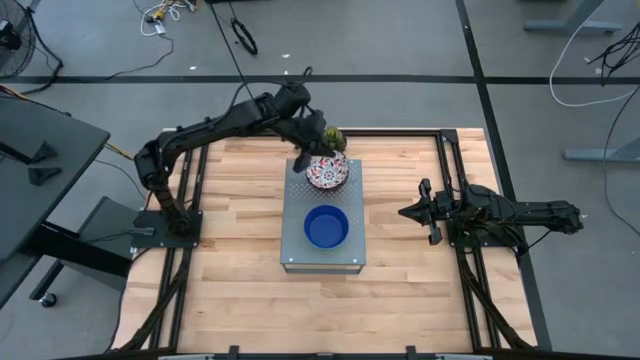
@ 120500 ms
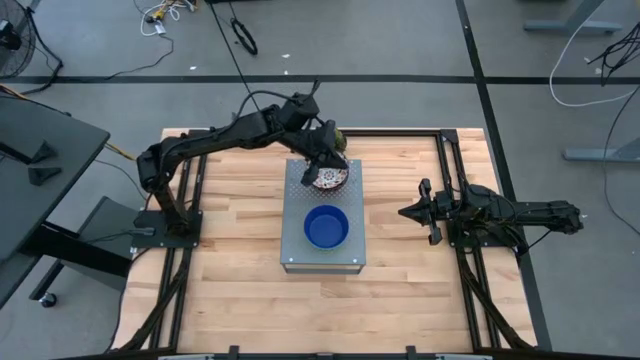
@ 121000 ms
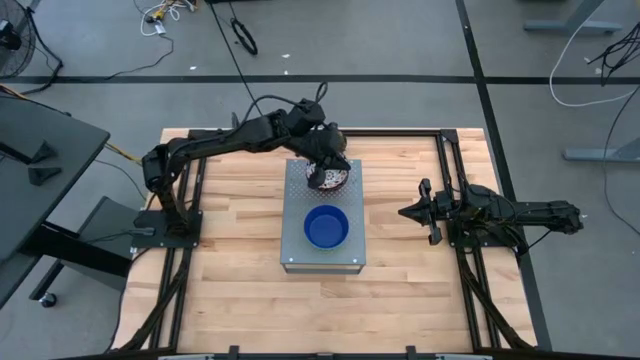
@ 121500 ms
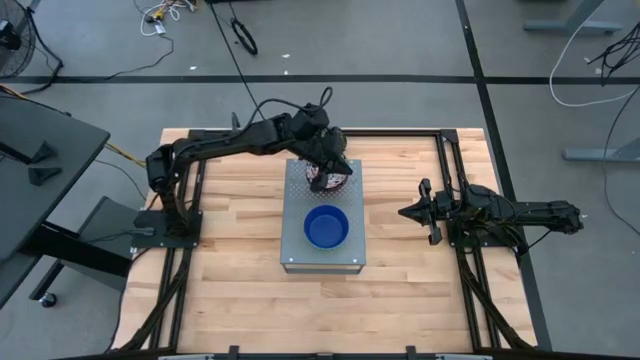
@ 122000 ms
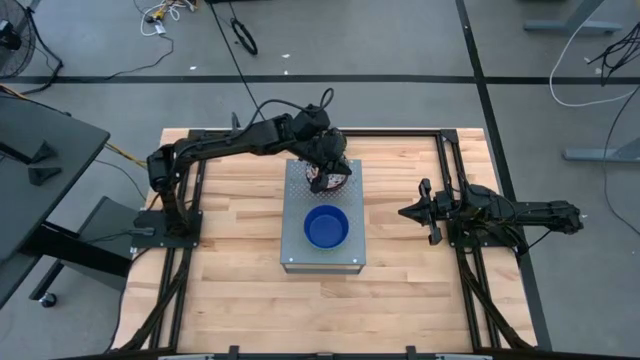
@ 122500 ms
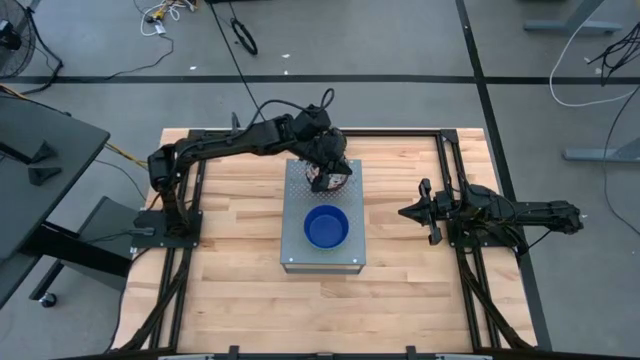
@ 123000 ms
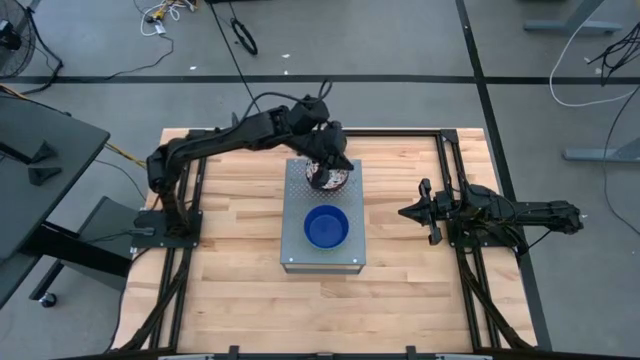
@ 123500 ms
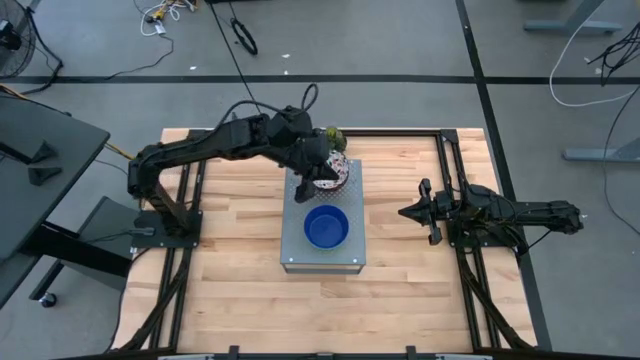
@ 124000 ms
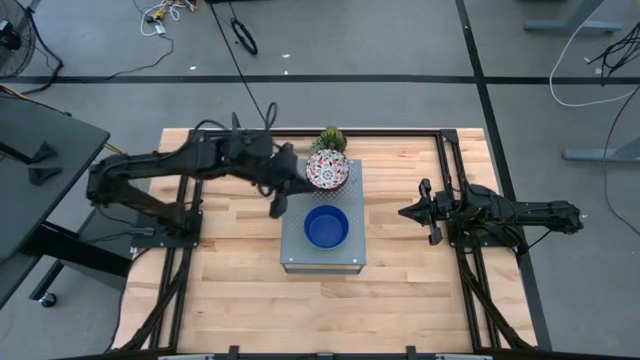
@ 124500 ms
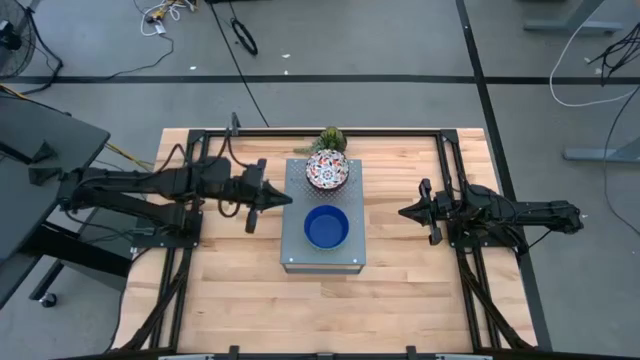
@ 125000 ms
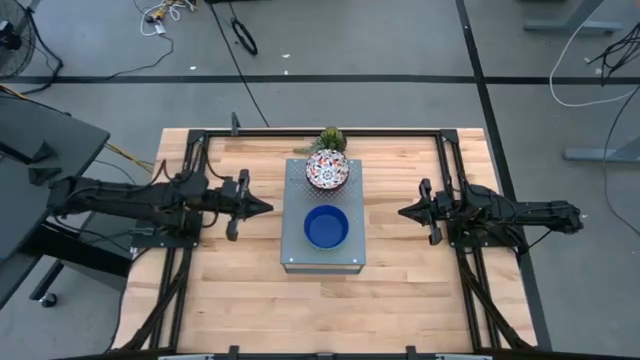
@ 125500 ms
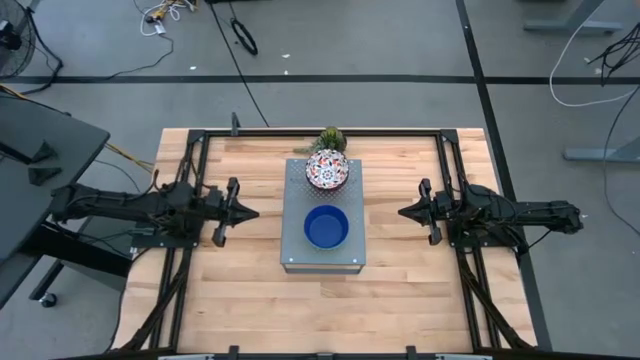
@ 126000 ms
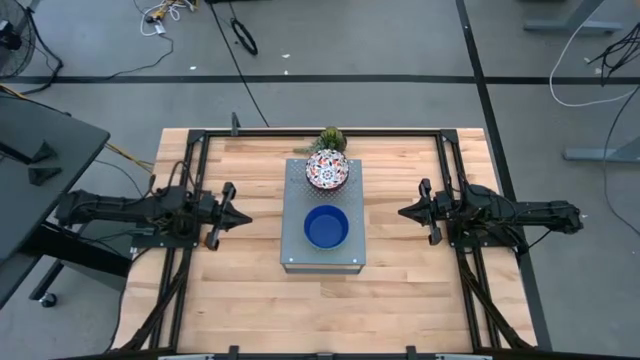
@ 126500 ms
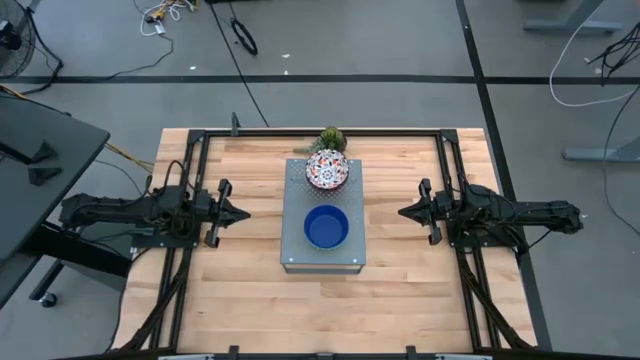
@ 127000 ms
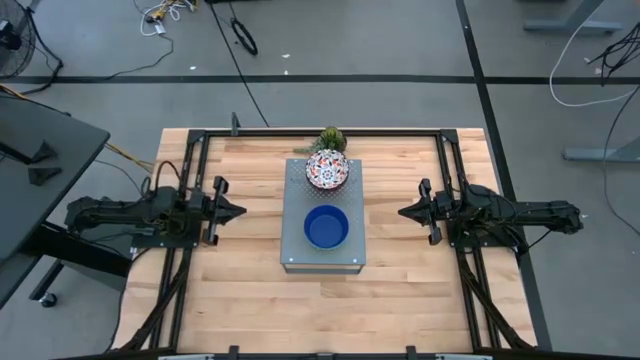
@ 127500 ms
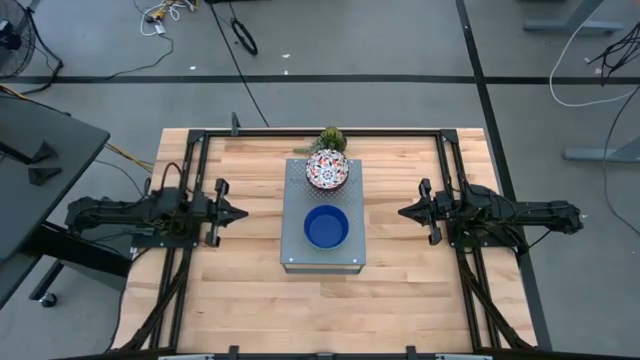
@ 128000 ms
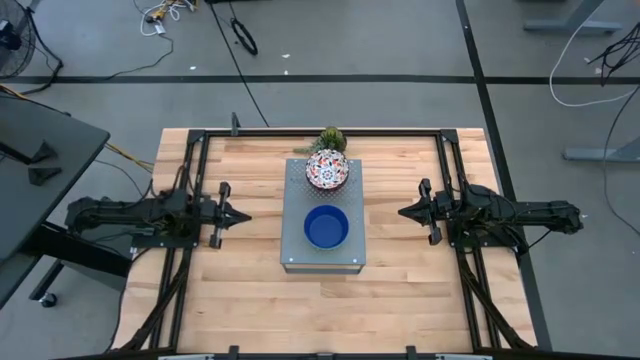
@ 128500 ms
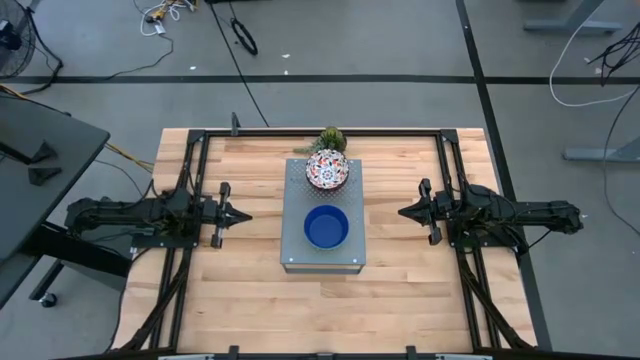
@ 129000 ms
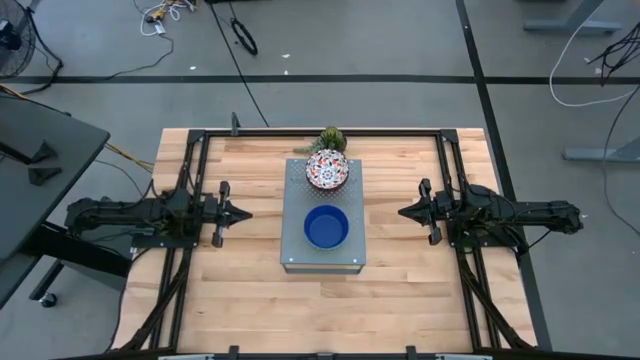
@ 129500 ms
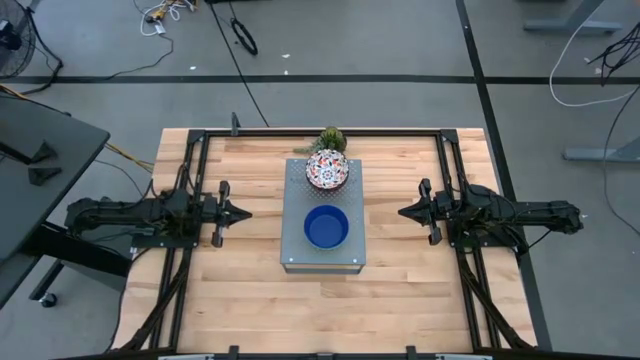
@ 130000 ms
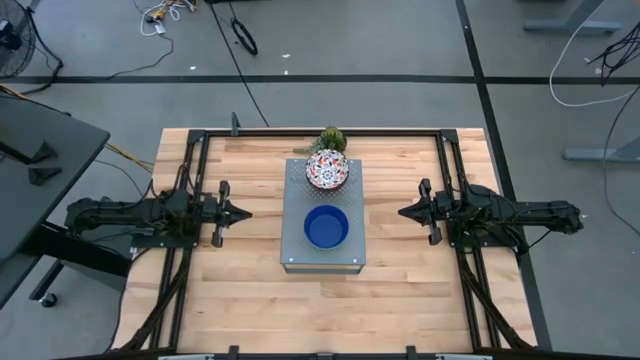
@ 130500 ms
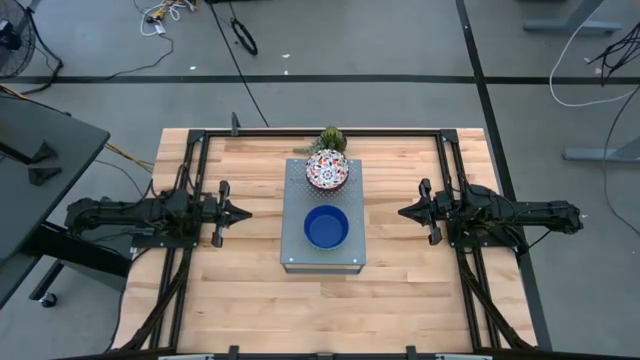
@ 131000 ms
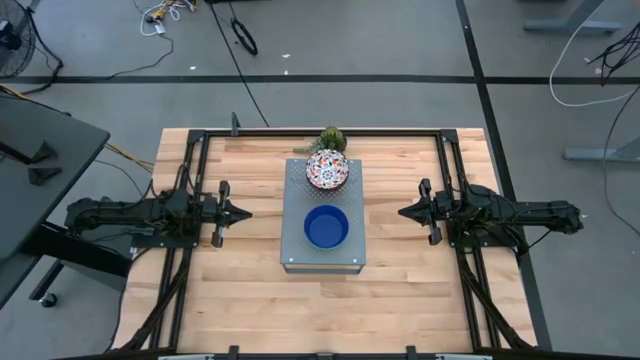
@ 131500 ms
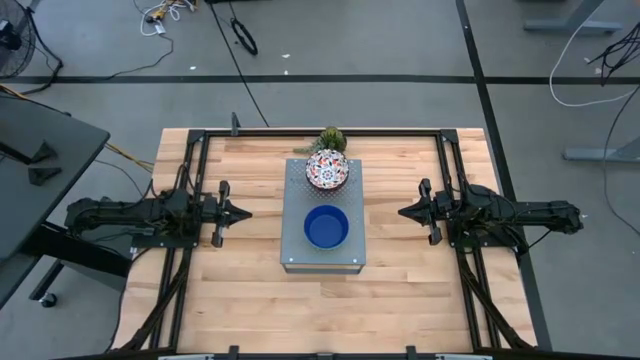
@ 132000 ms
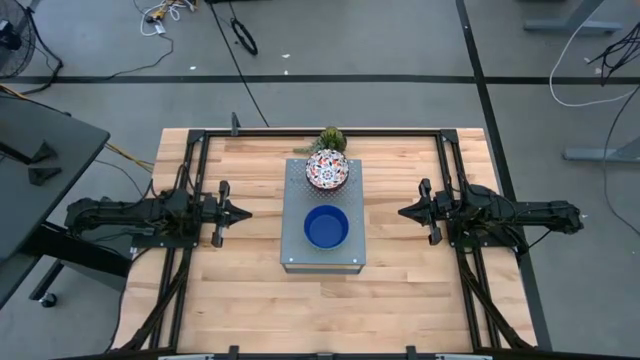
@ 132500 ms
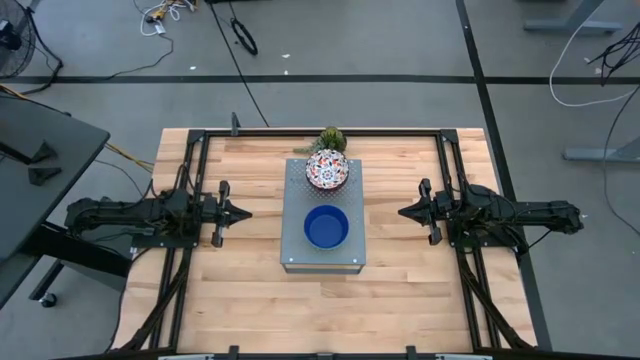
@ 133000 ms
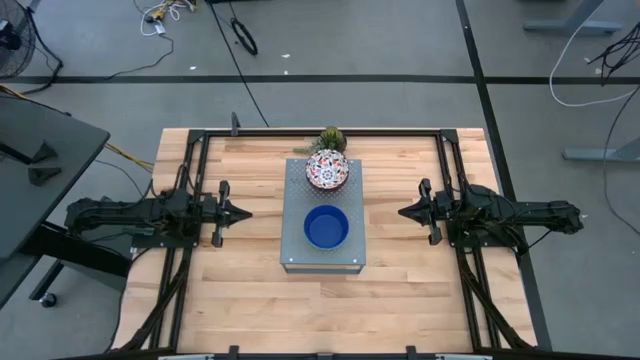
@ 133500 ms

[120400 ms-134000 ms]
Task: Pick & Place Mini bowls
Return to Home Position

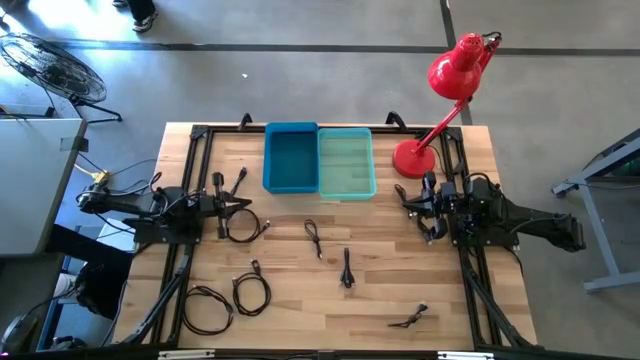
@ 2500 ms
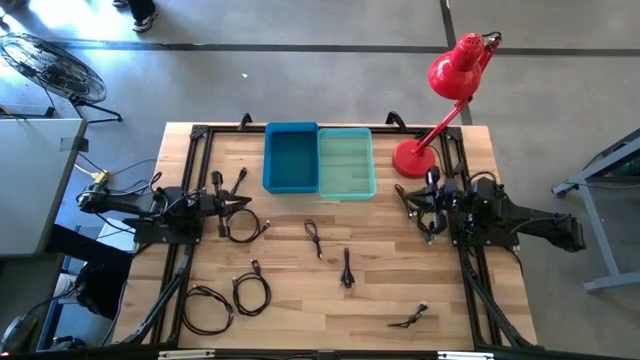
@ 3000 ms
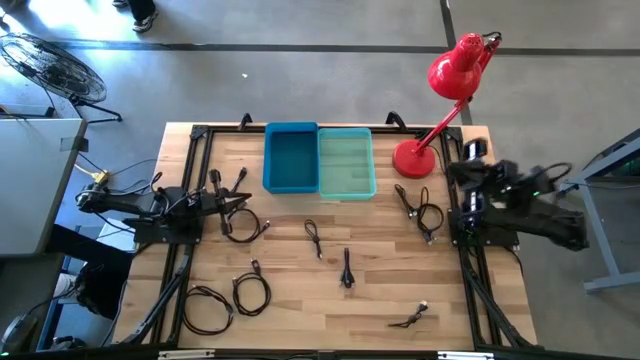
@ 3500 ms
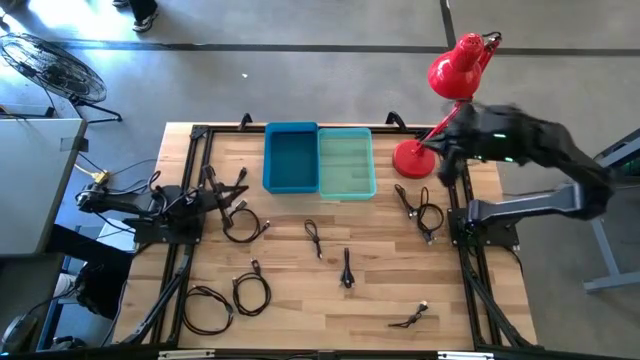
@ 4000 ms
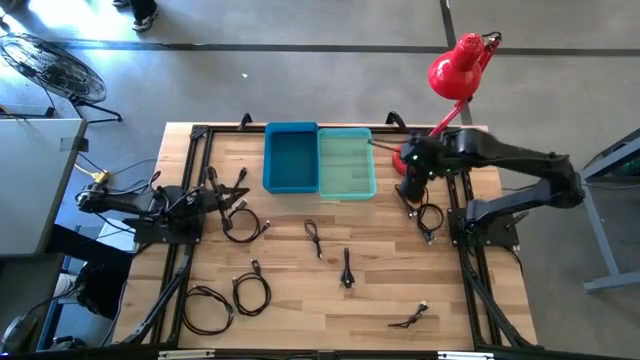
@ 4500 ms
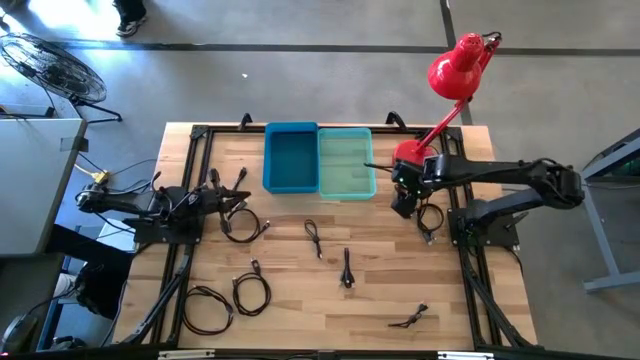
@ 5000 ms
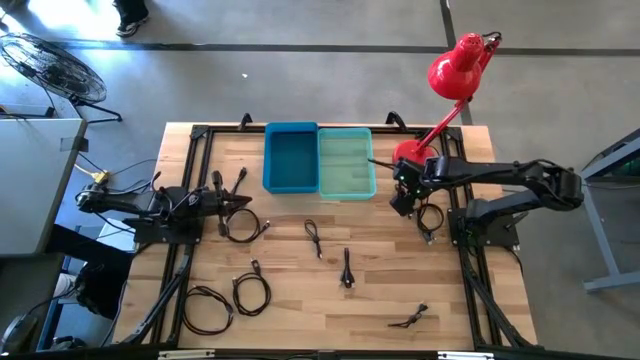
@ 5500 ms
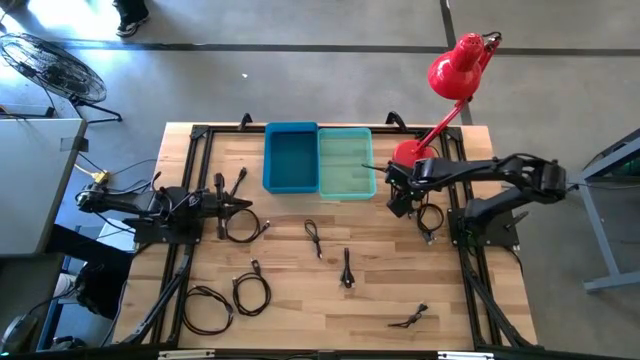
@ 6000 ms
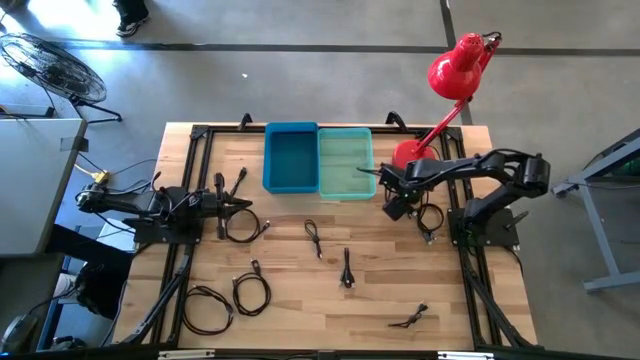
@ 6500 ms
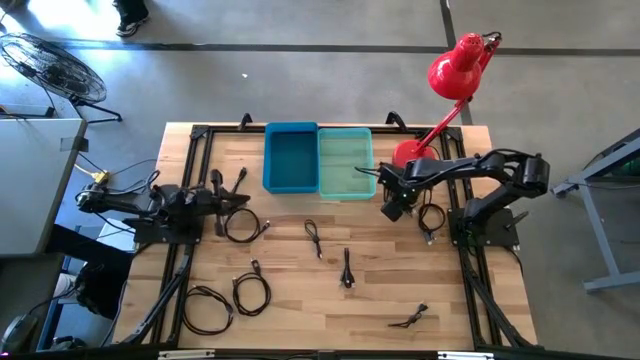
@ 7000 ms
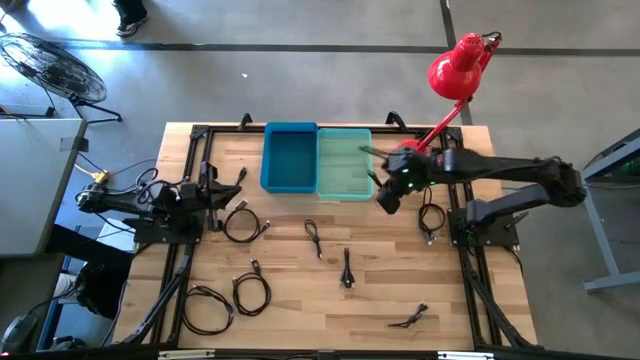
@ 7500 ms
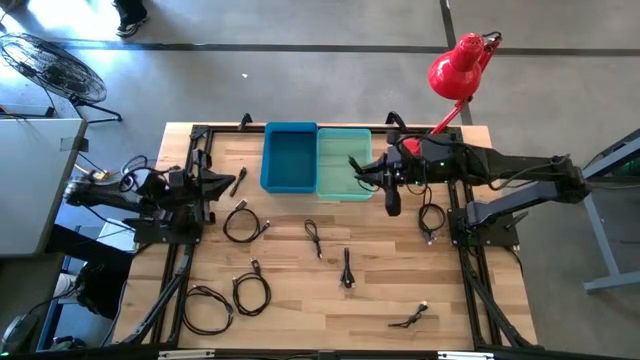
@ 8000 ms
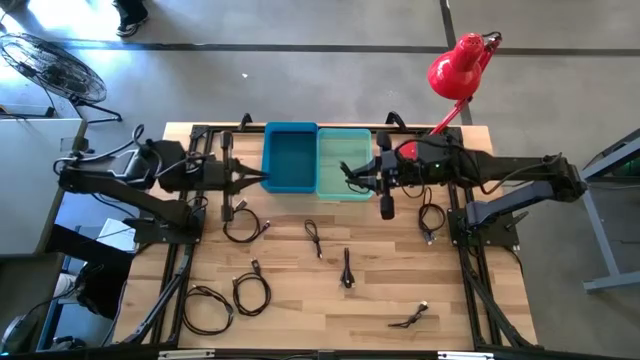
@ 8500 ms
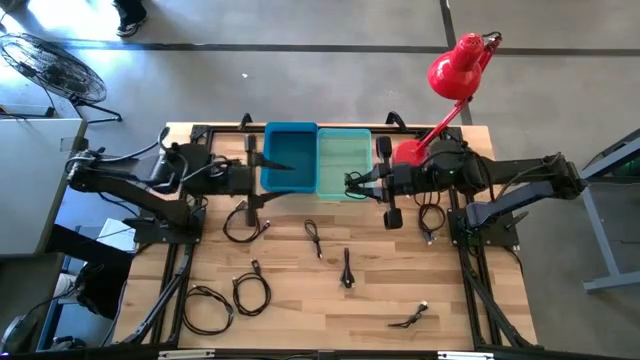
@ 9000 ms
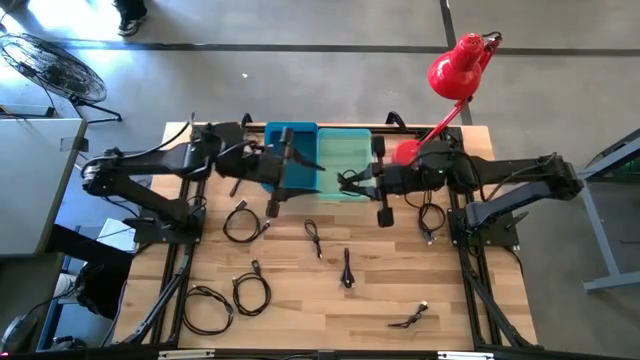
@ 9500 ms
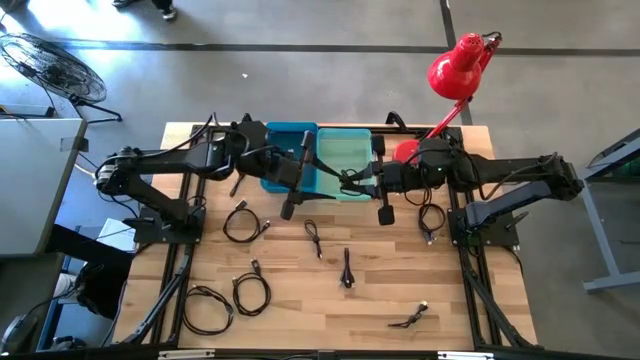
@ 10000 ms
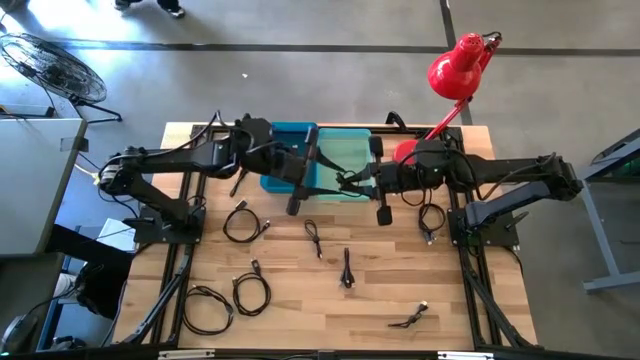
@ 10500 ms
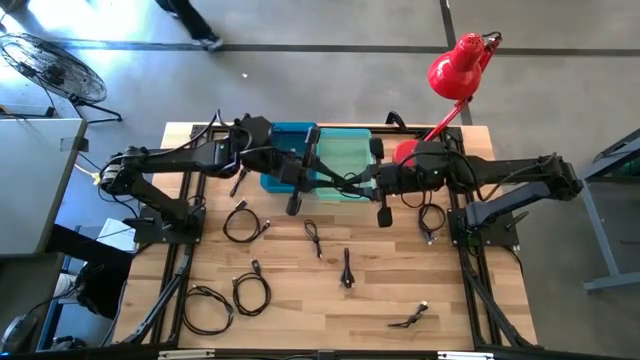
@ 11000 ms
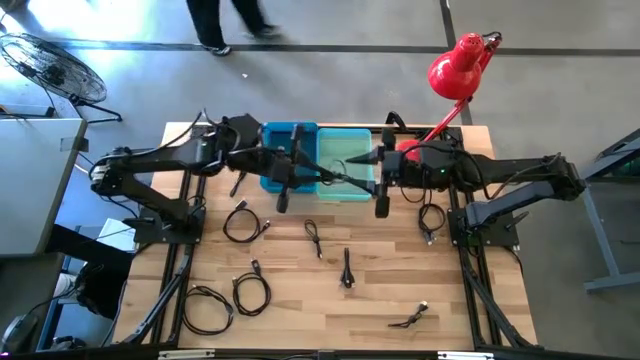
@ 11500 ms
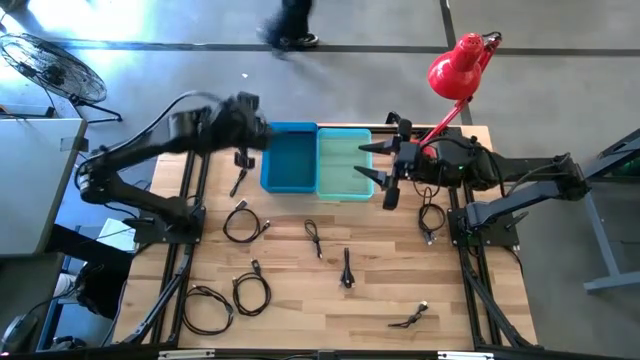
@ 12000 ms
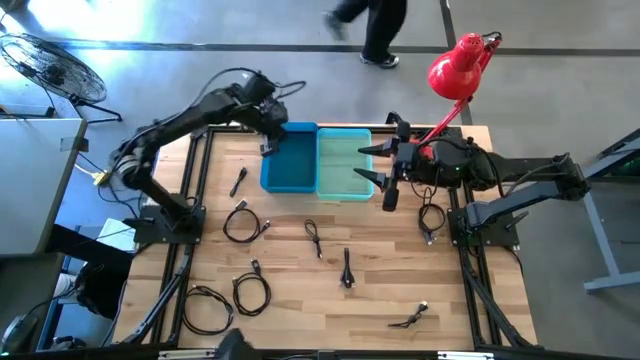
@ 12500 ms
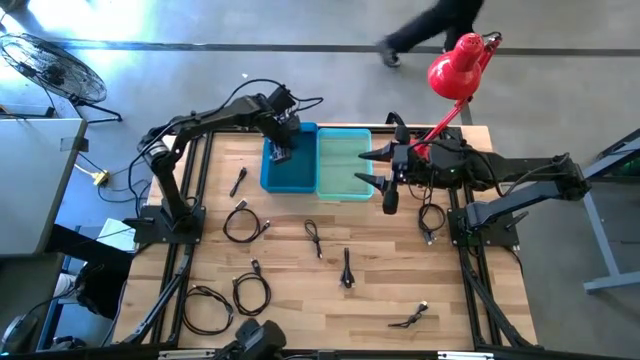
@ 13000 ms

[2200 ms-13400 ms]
Task: Pick & Place USB Port
Put the black USB cable into the blue bin
